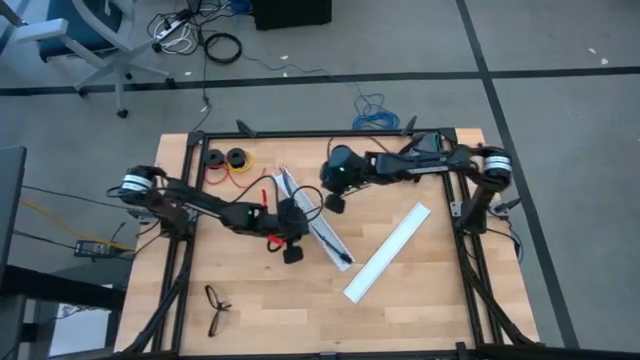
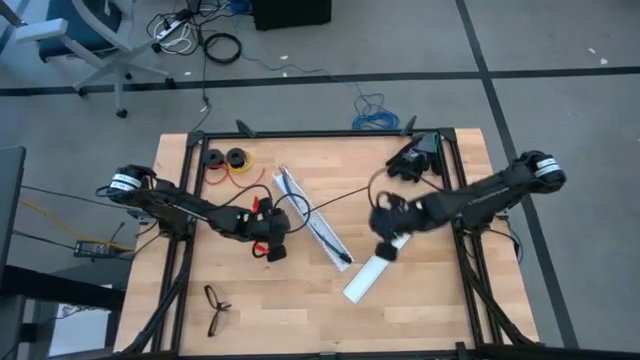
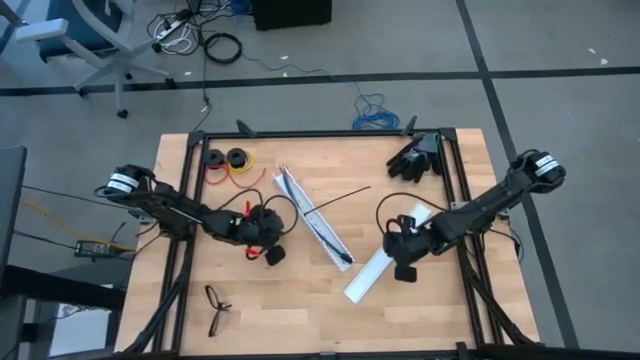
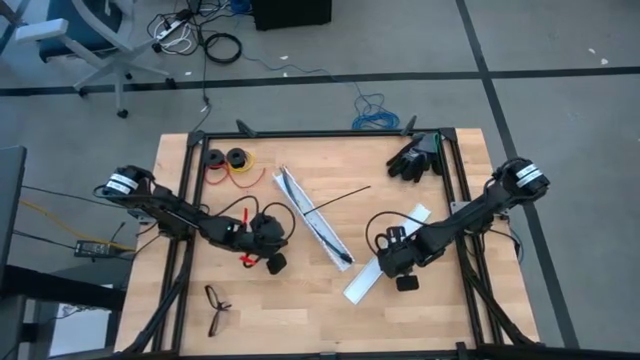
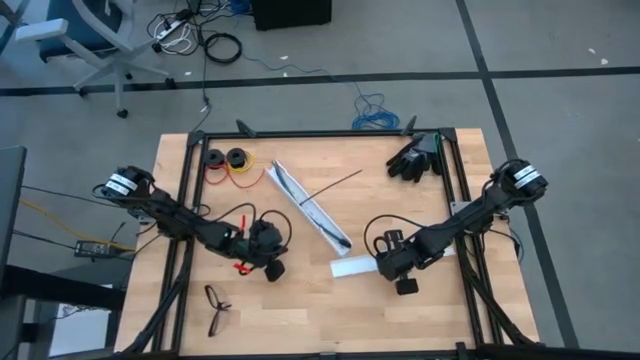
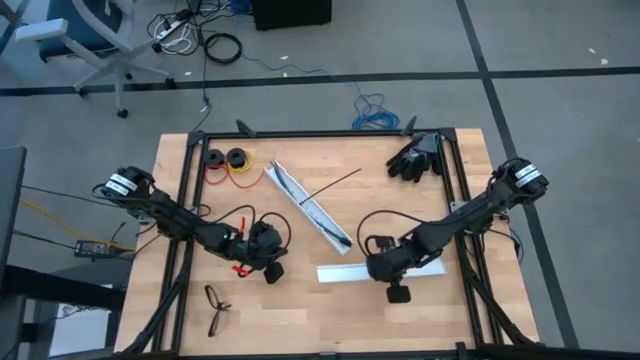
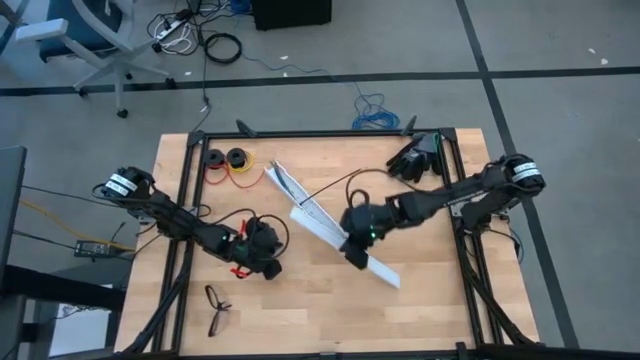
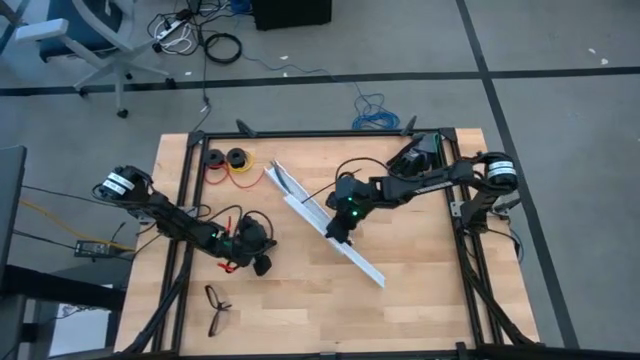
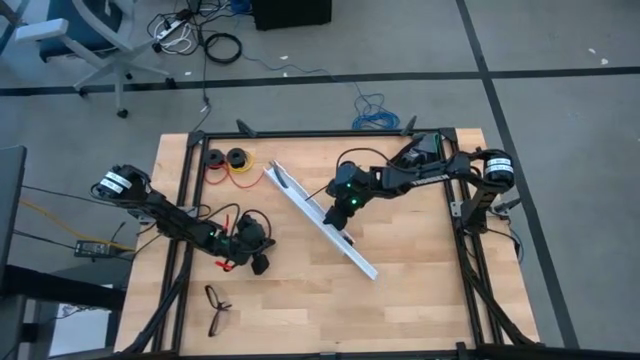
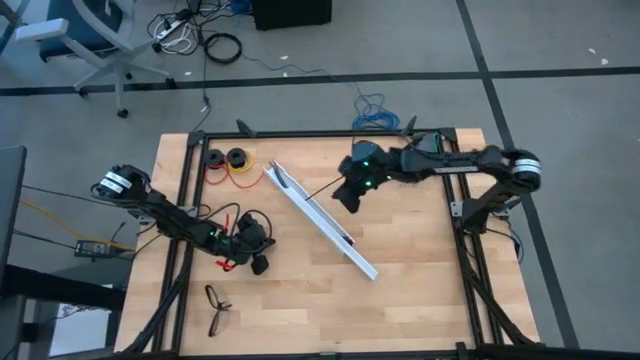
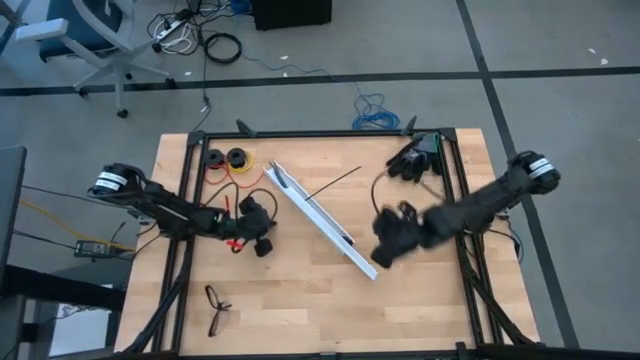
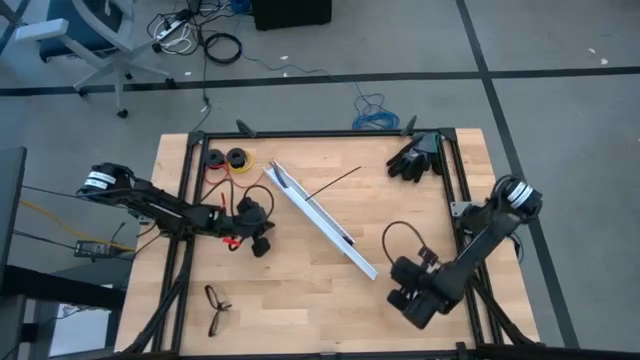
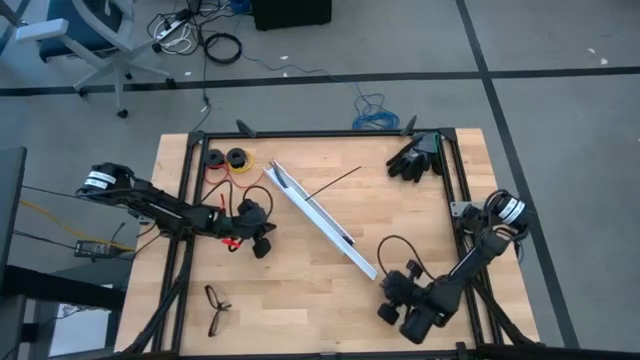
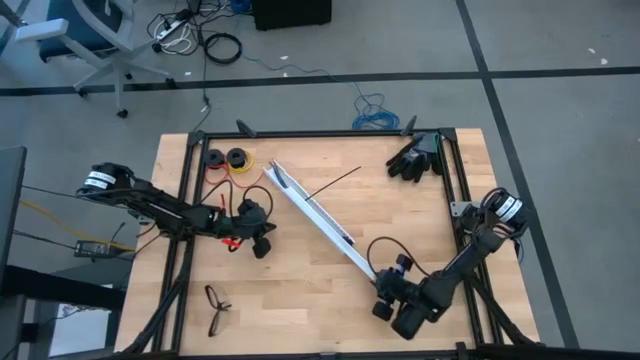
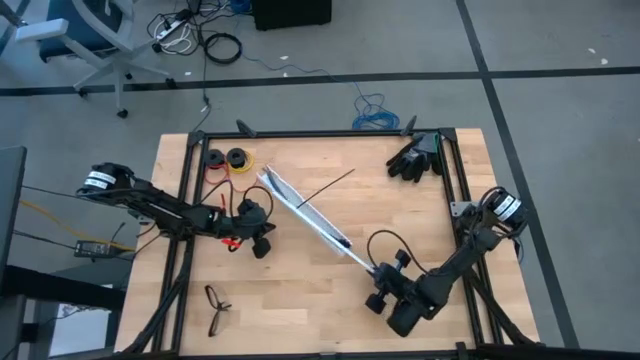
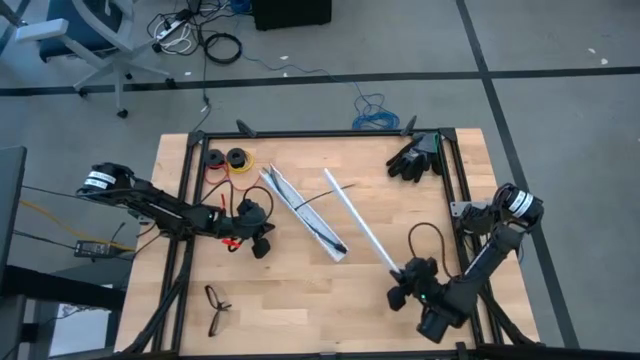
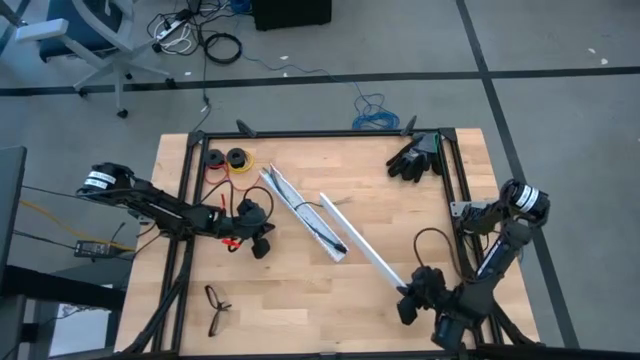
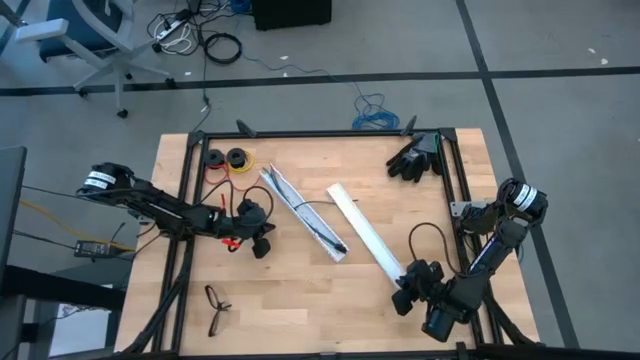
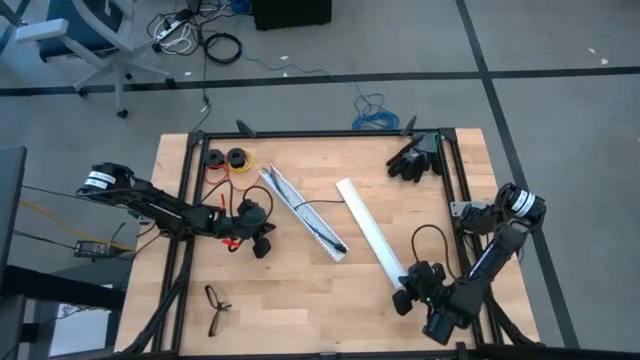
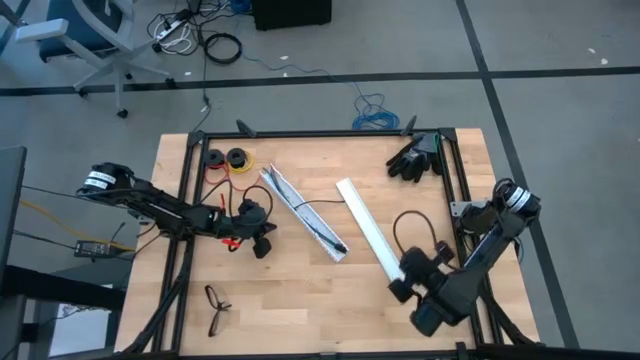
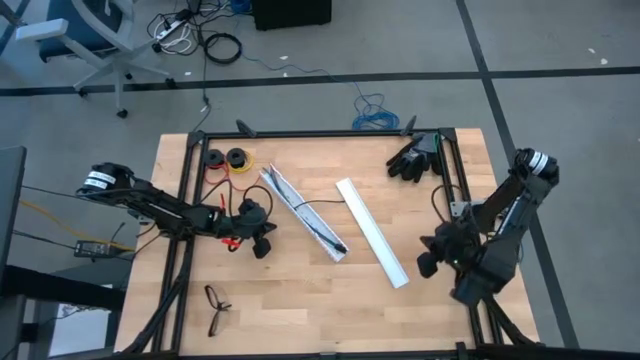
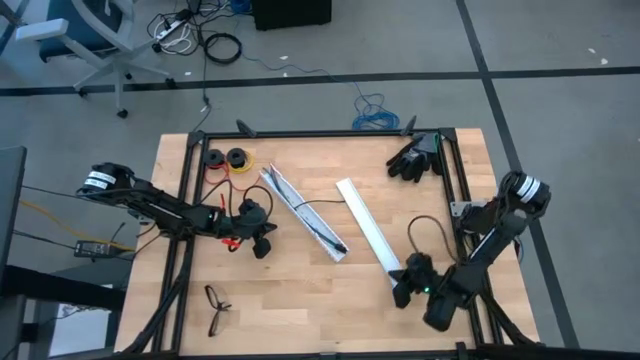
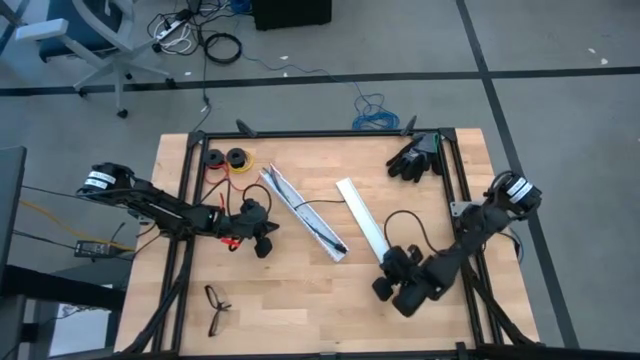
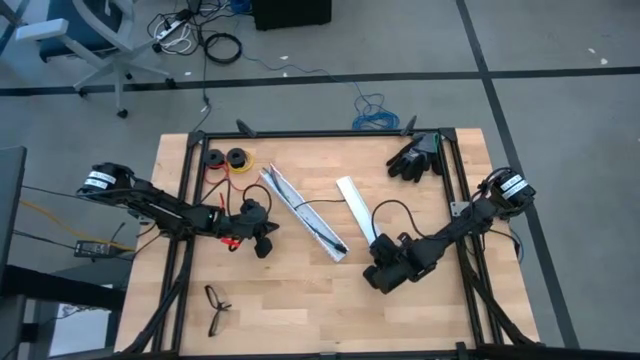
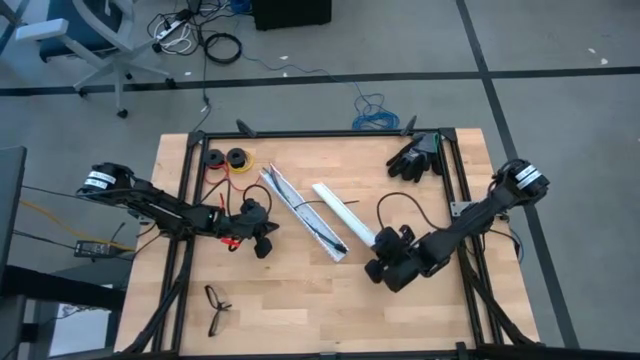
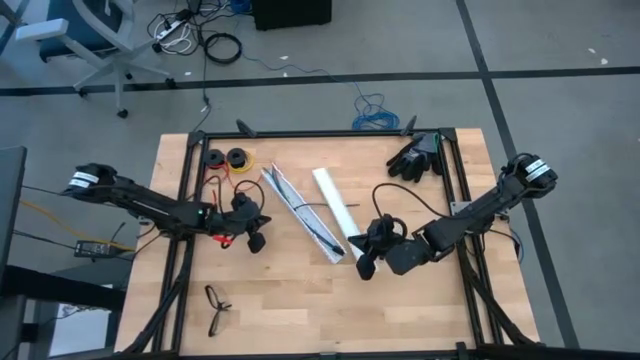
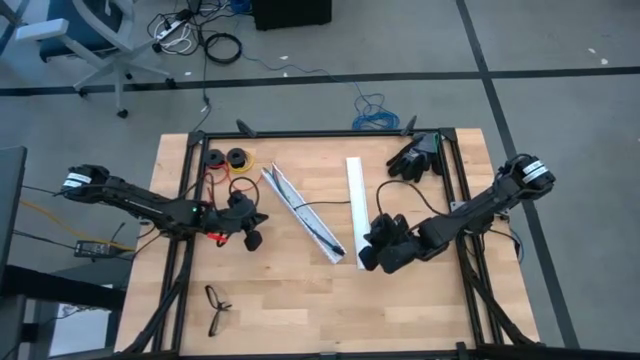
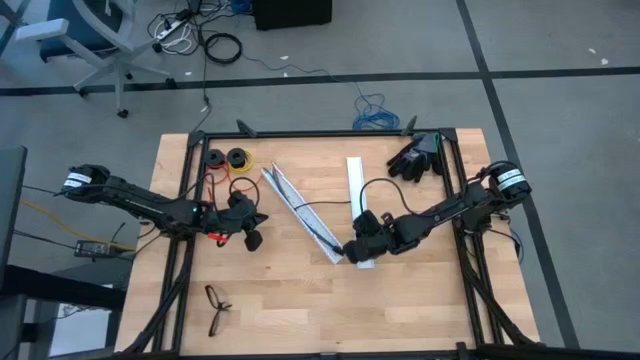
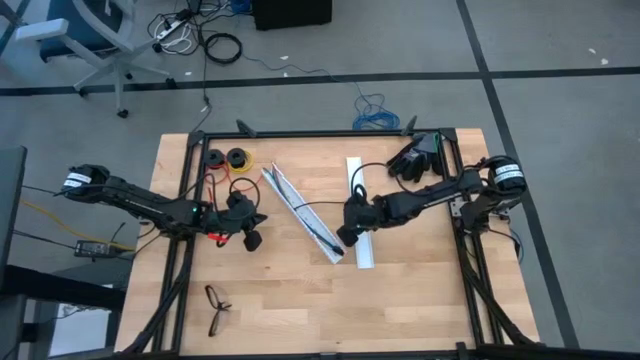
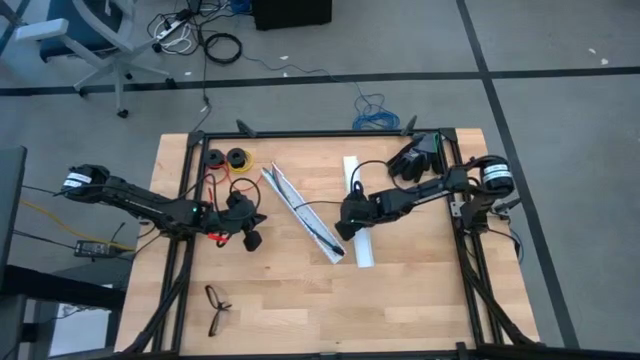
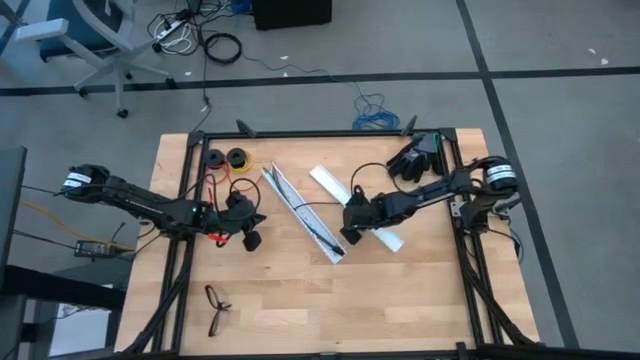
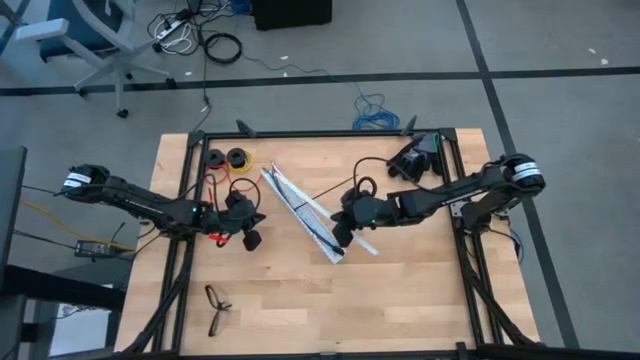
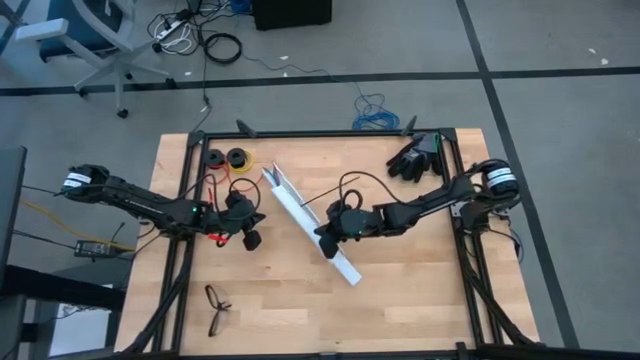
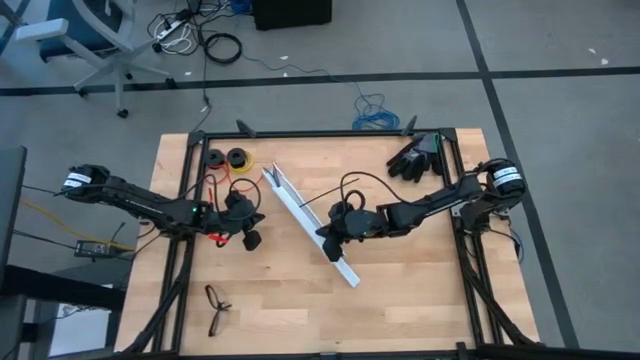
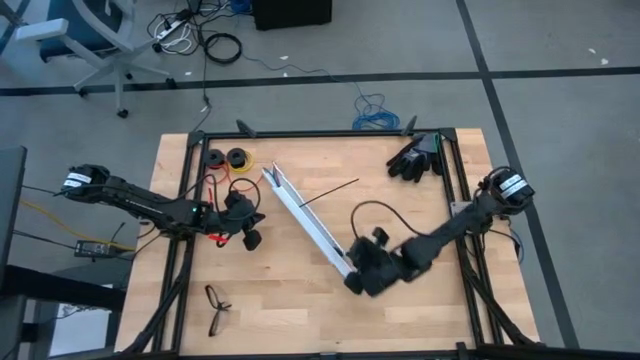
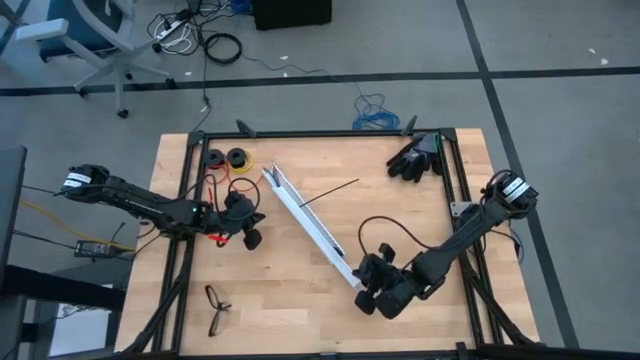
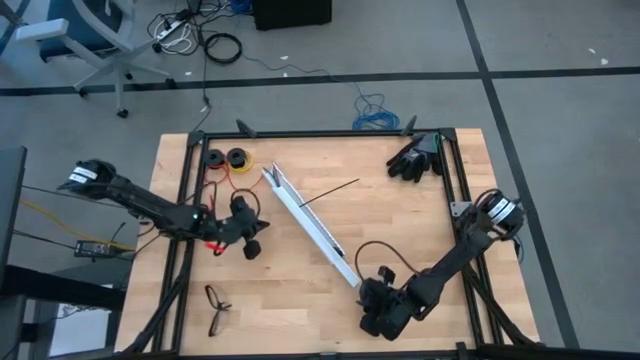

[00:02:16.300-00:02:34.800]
Task: Ziptie cables
Close the white cable duct

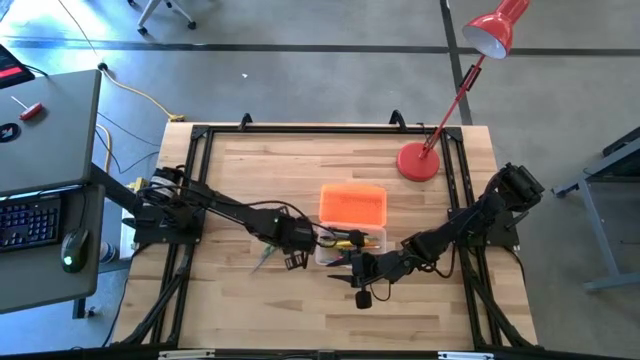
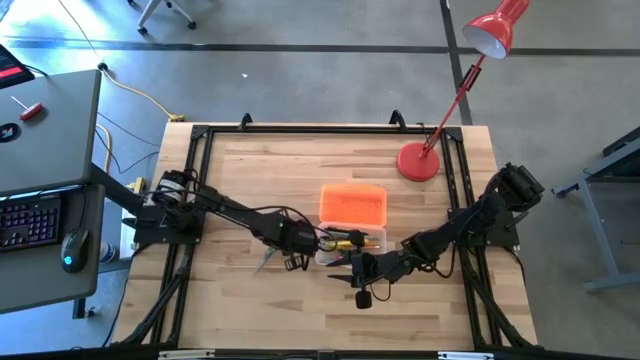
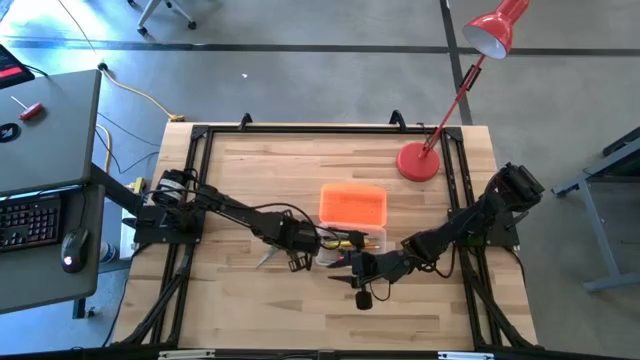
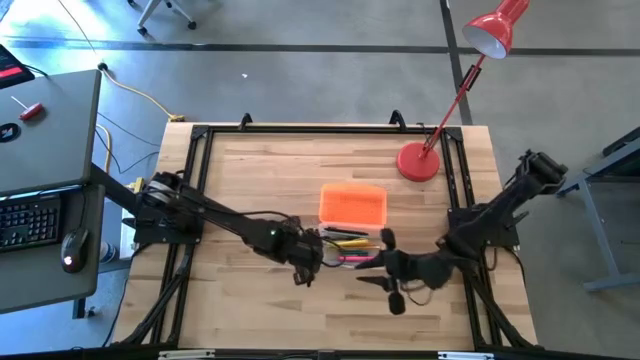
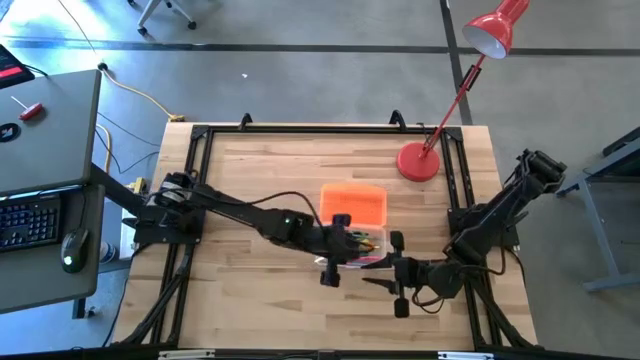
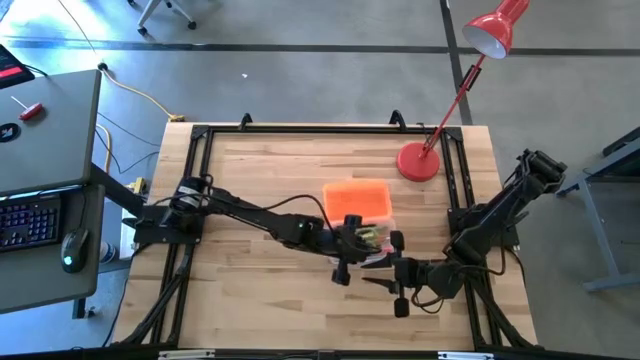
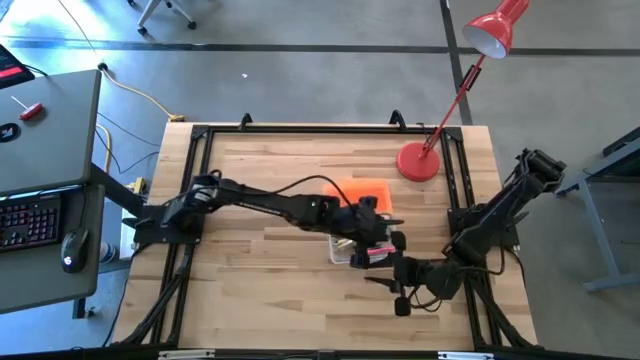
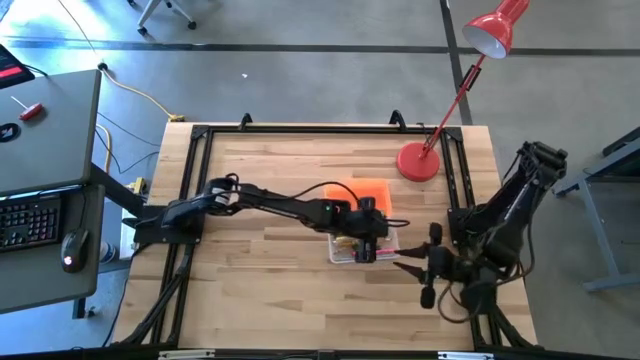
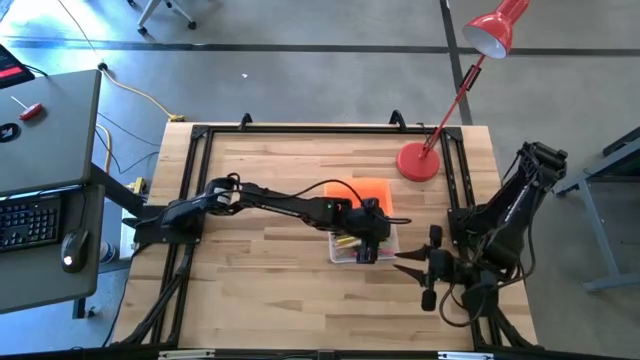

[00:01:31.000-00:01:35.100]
Task: Pick & place school supplies into a supply box
Put the green scissors into the supply box
